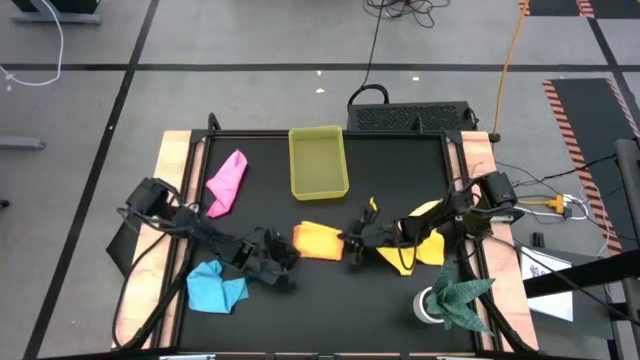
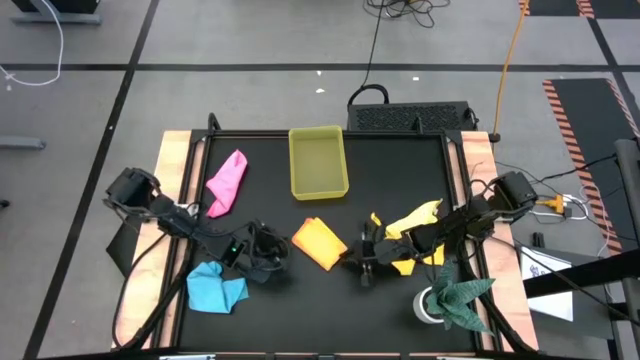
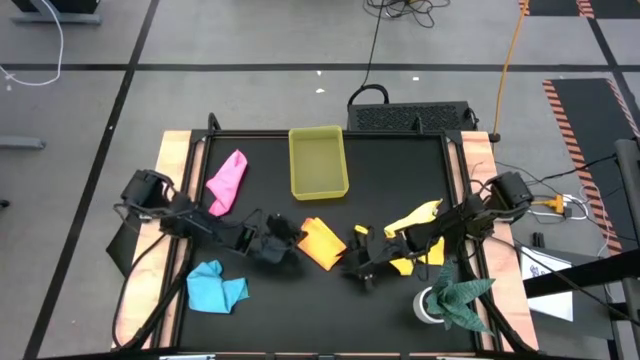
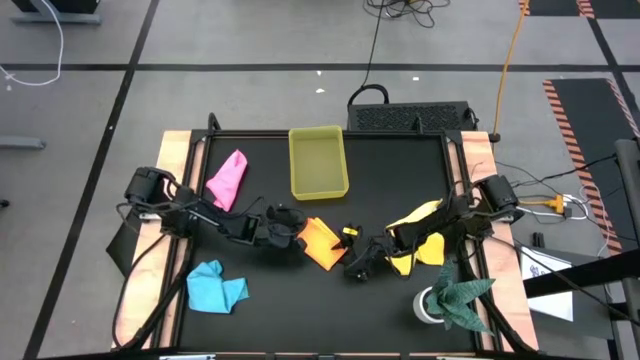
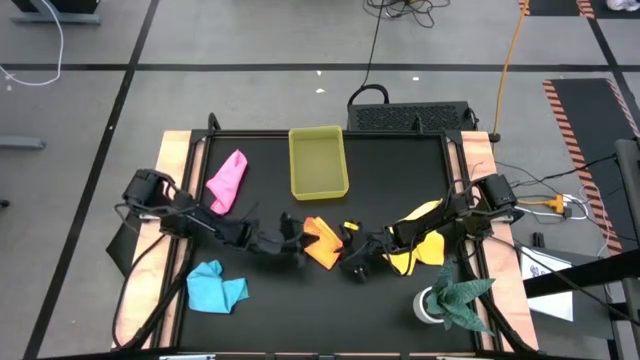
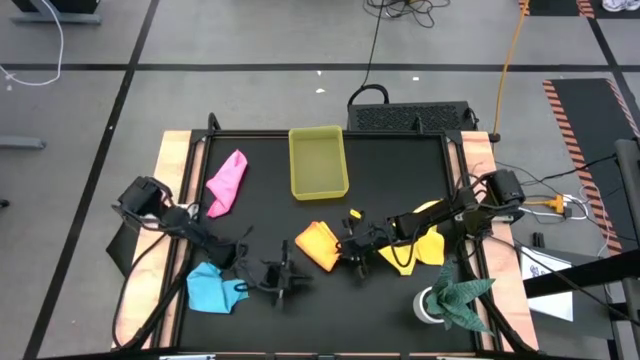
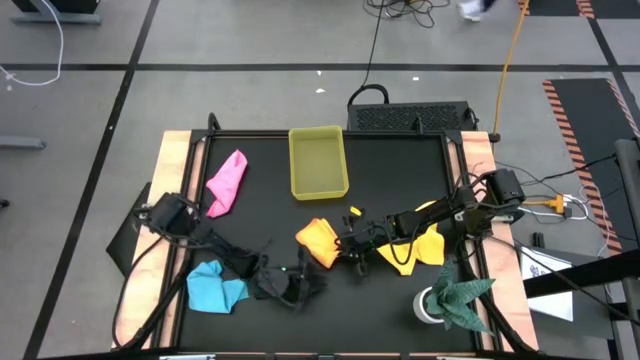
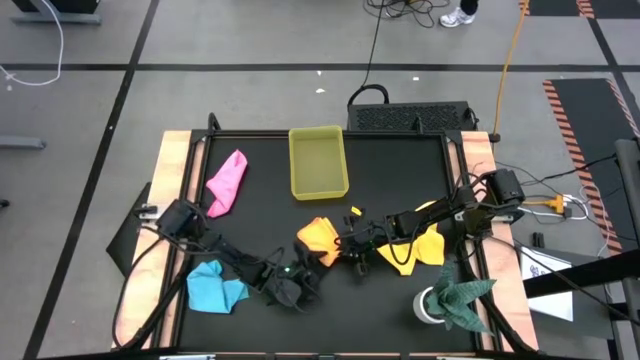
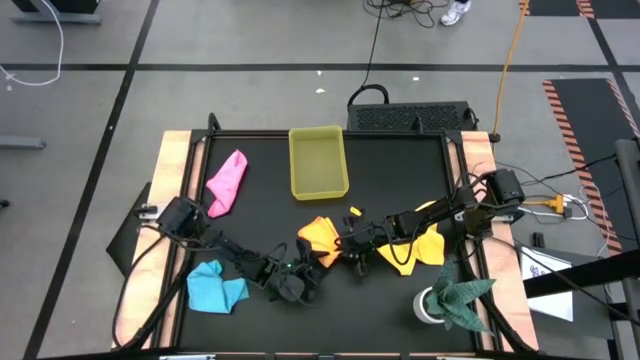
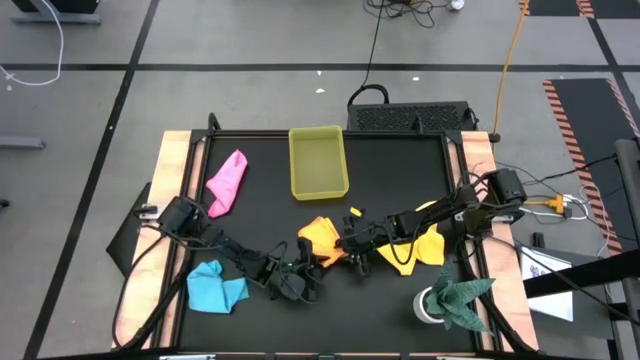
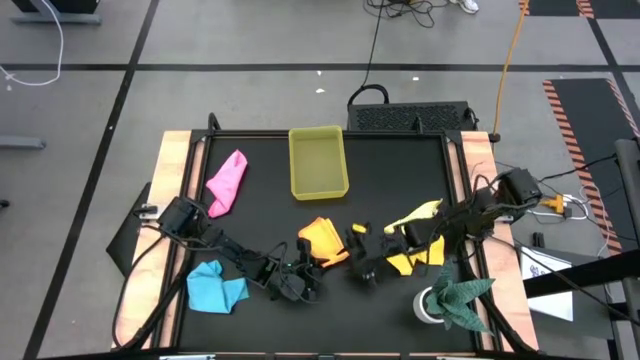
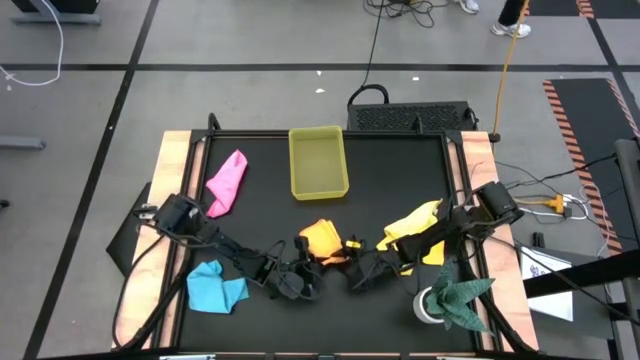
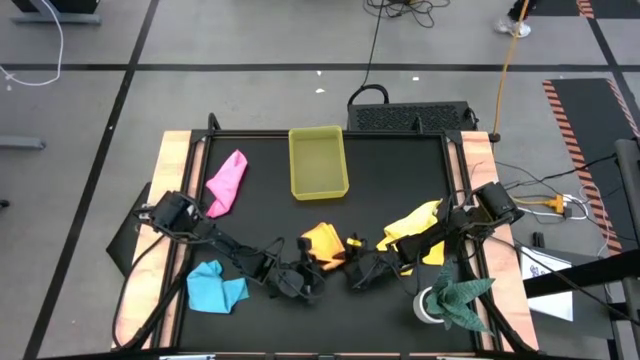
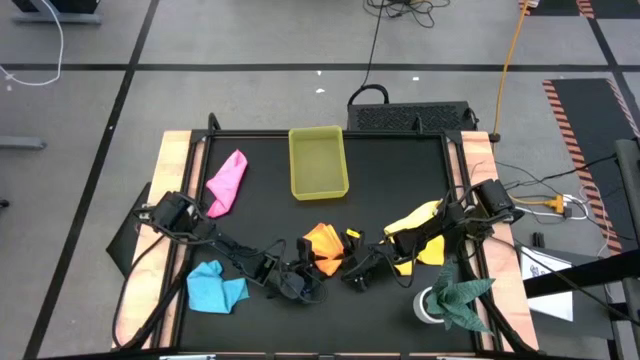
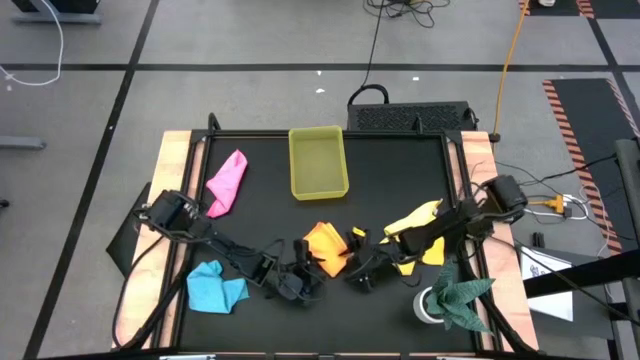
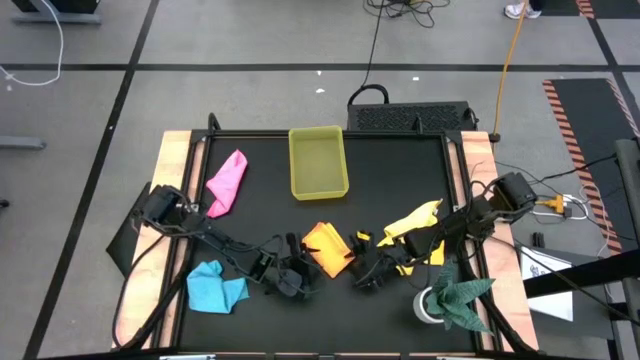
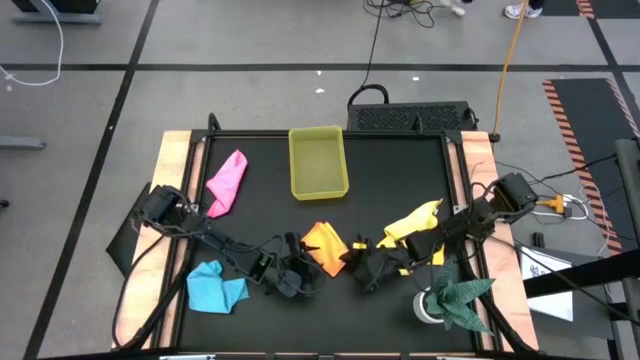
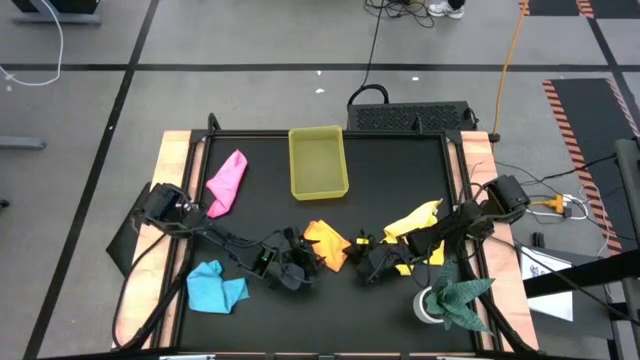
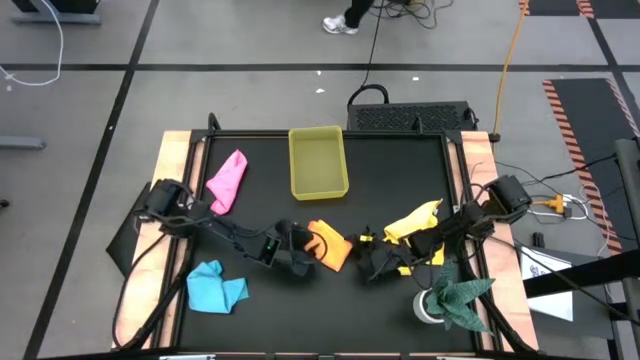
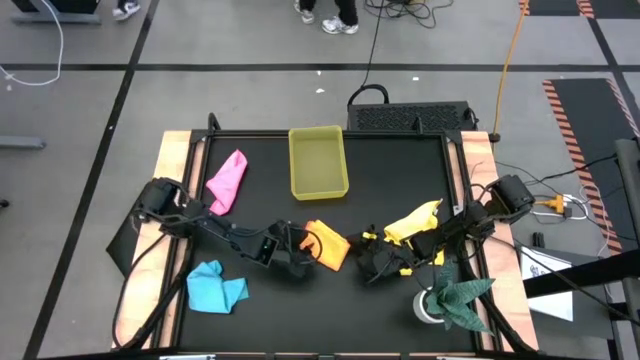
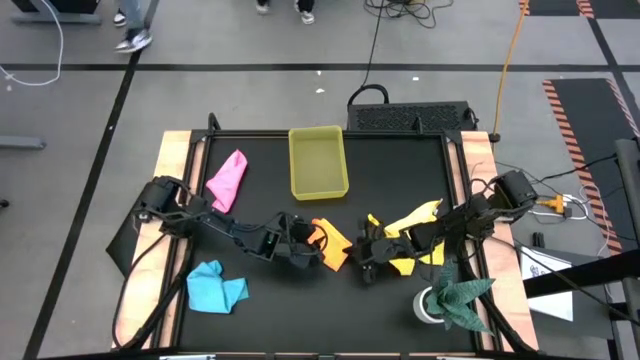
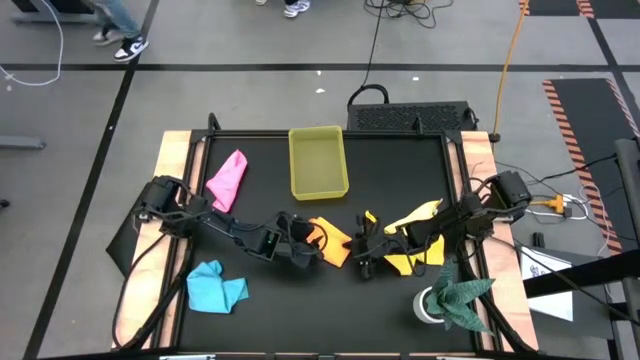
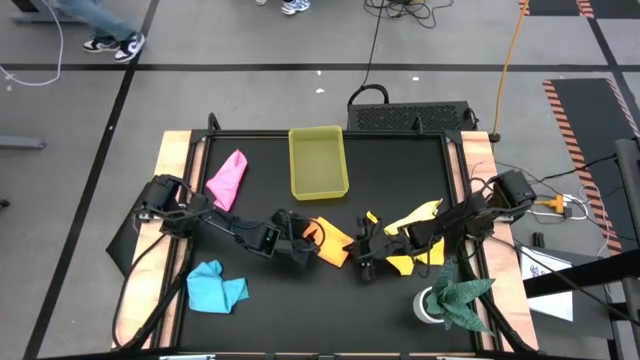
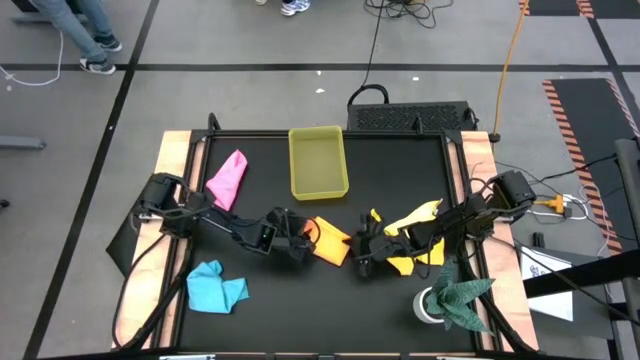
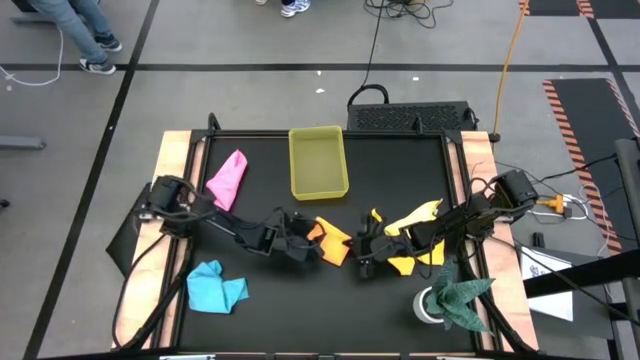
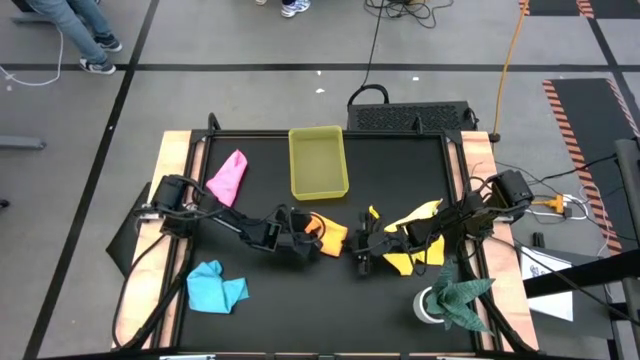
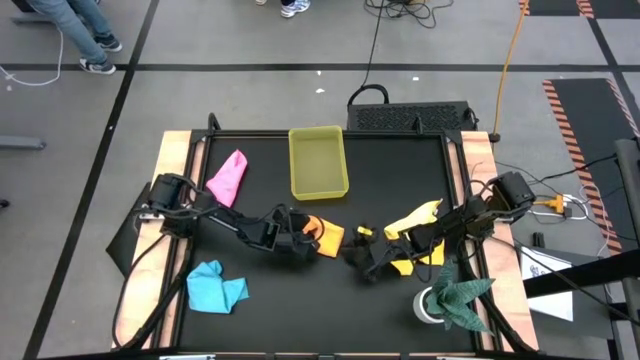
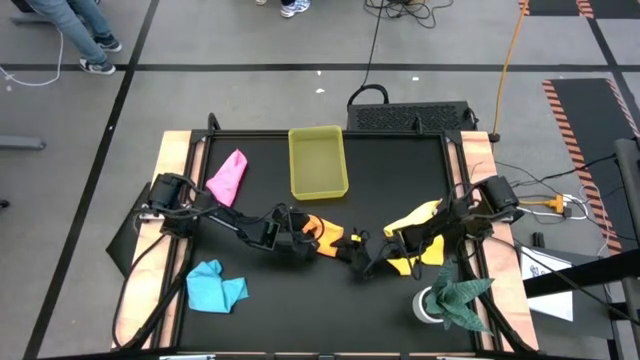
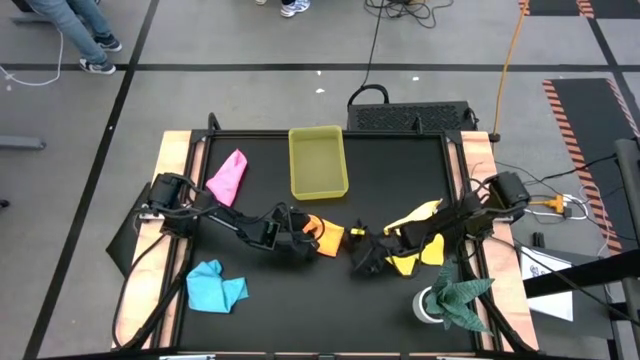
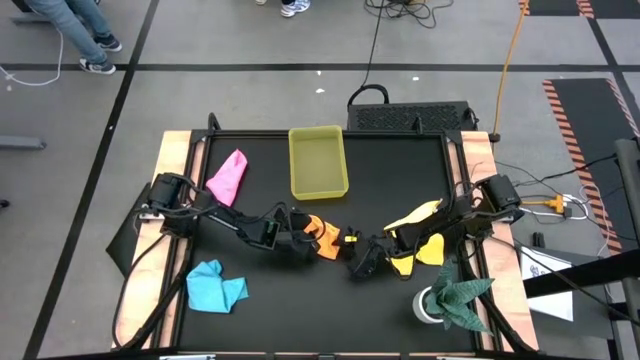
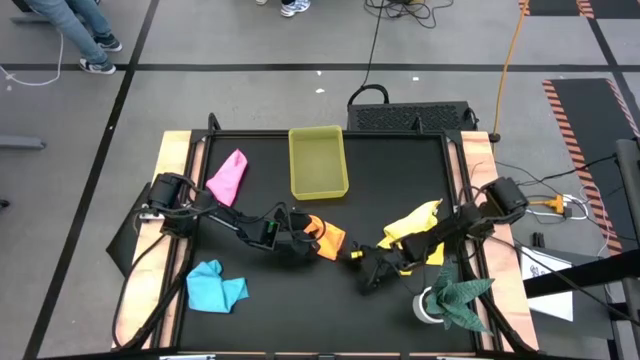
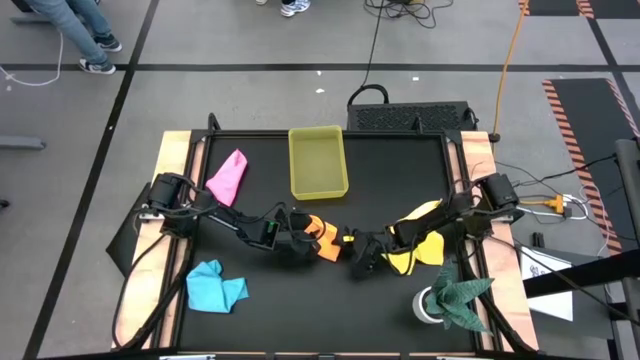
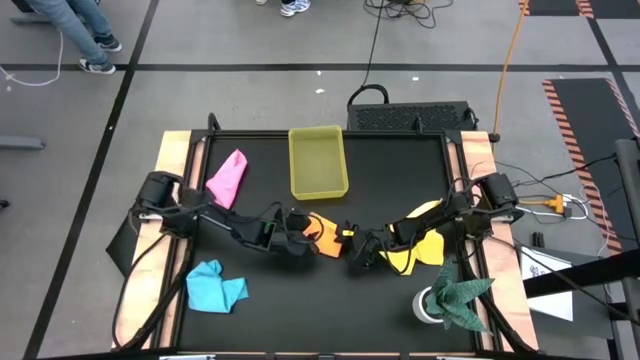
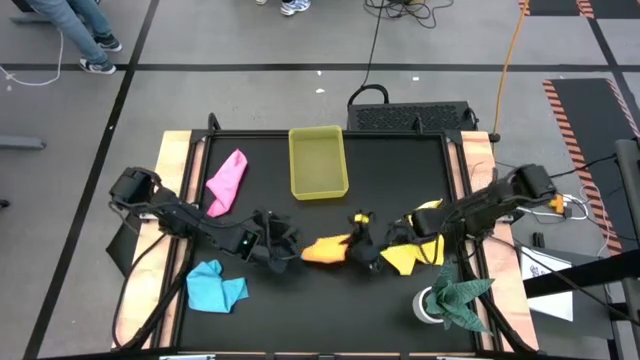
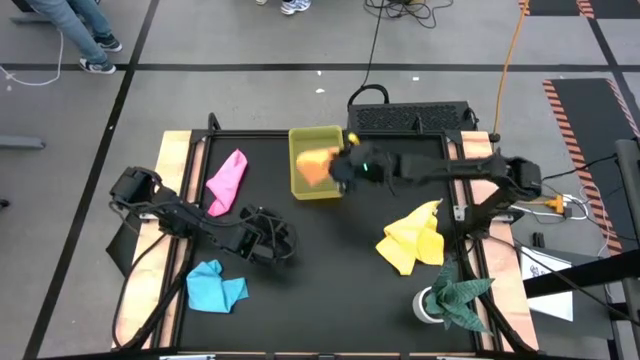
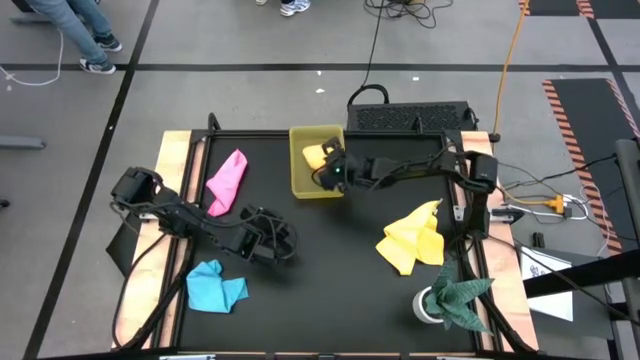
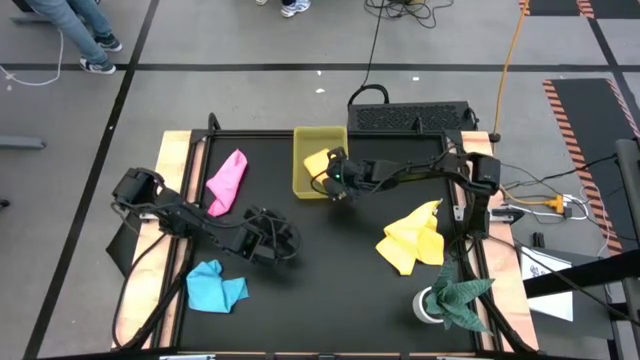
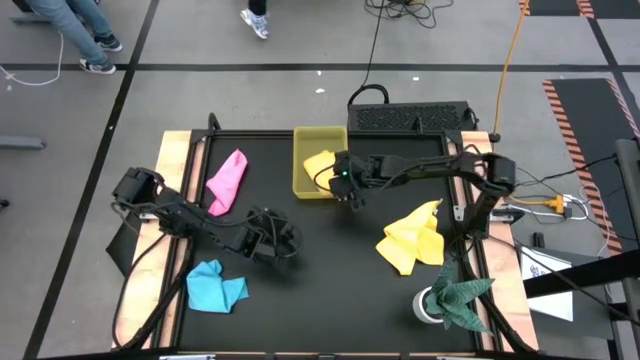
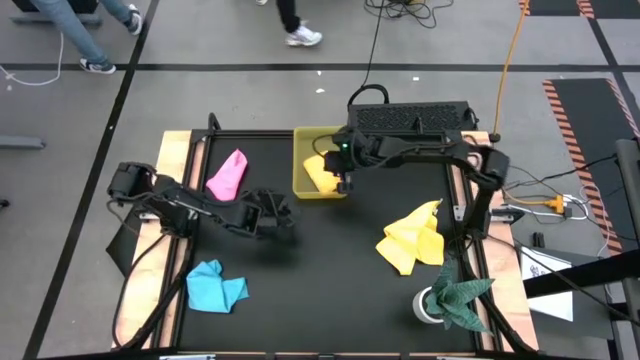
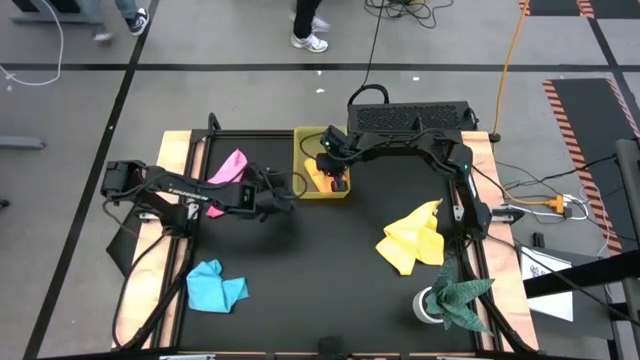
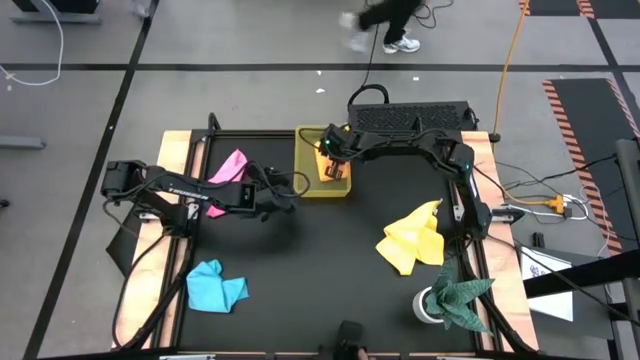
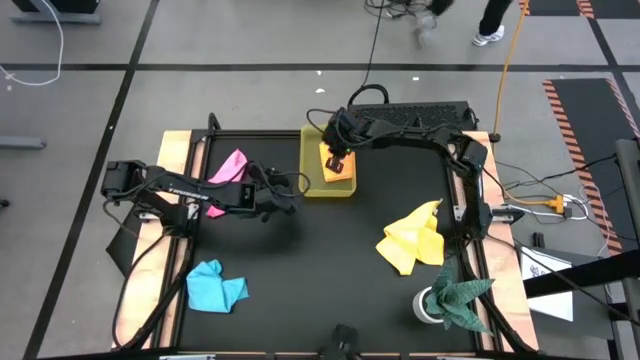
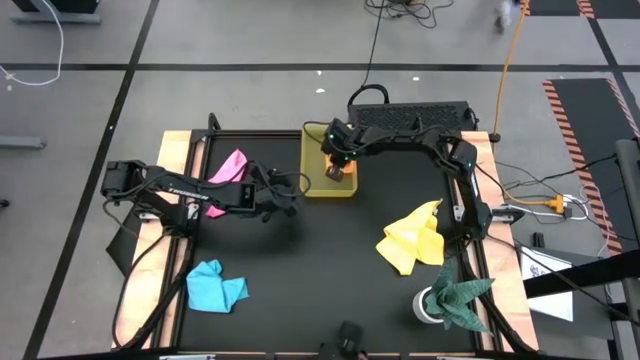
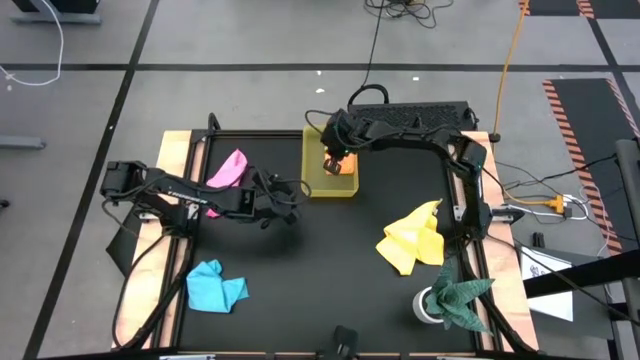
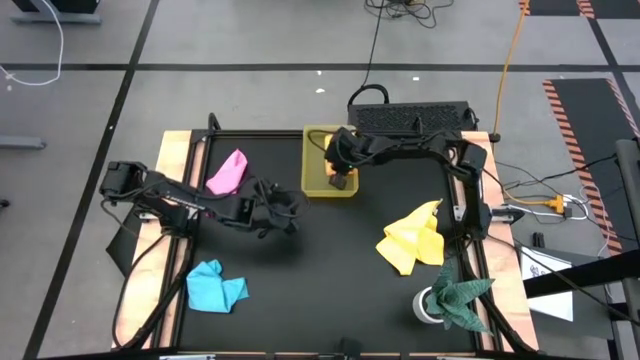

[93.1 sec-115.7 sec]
Task: Fold microfiber towels
Put the orange towel into the yellow bin
